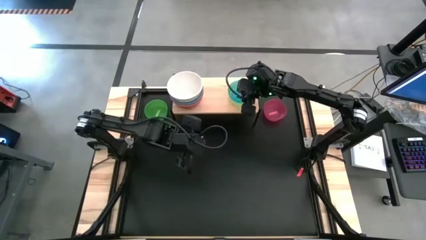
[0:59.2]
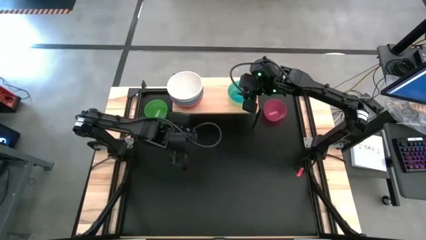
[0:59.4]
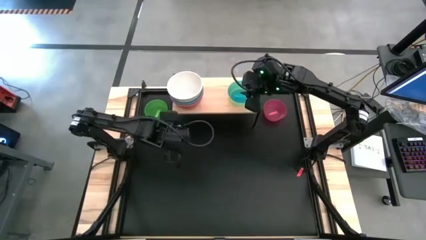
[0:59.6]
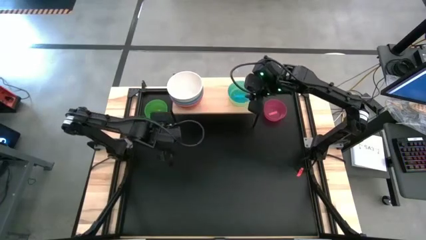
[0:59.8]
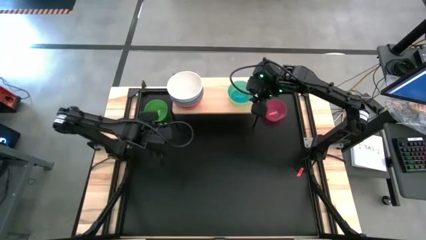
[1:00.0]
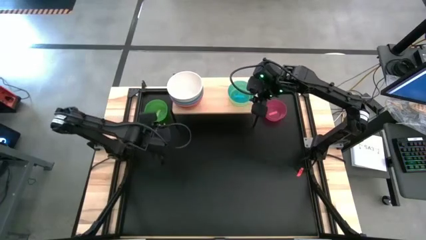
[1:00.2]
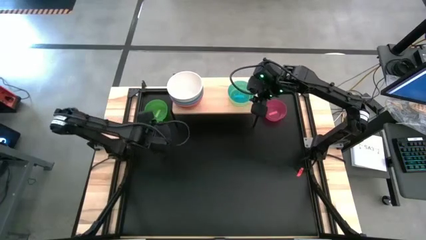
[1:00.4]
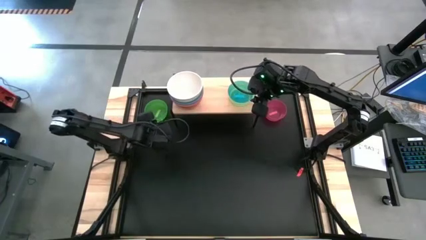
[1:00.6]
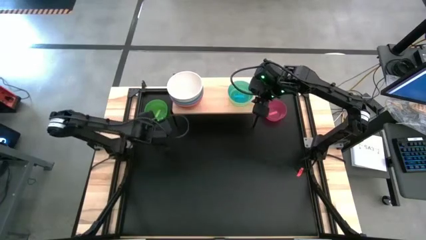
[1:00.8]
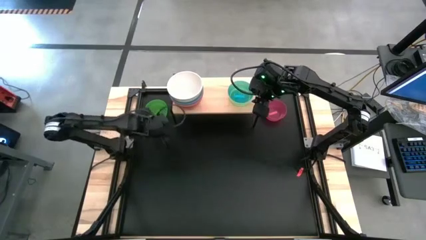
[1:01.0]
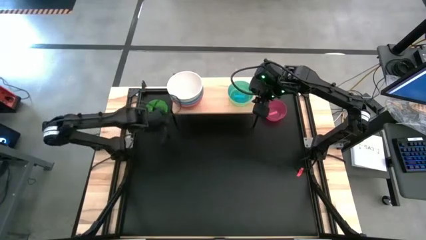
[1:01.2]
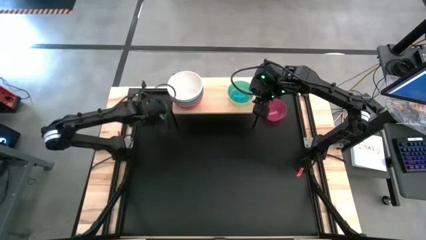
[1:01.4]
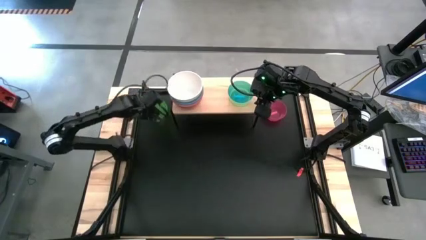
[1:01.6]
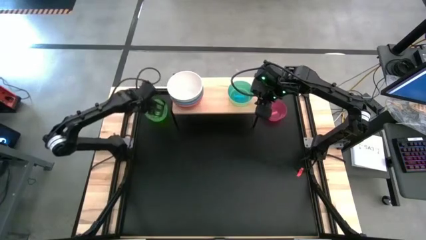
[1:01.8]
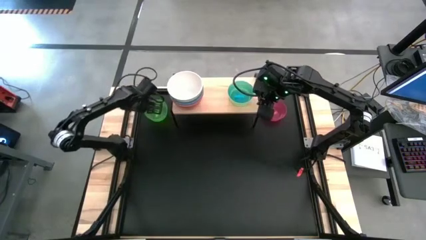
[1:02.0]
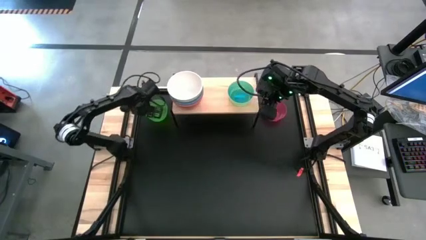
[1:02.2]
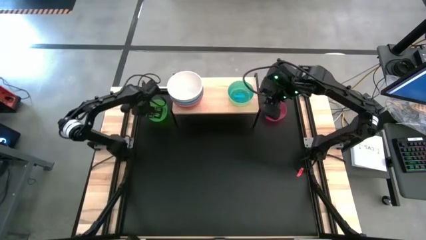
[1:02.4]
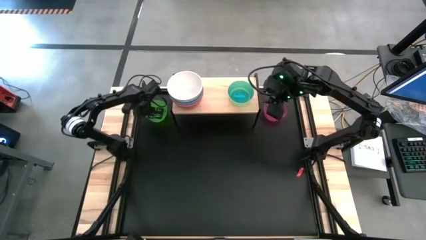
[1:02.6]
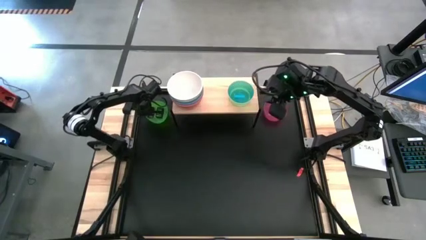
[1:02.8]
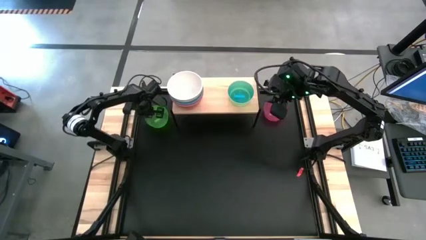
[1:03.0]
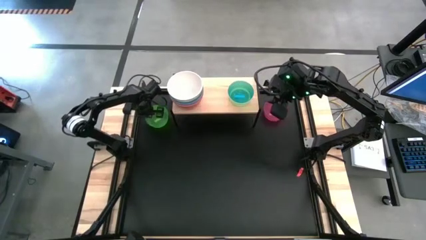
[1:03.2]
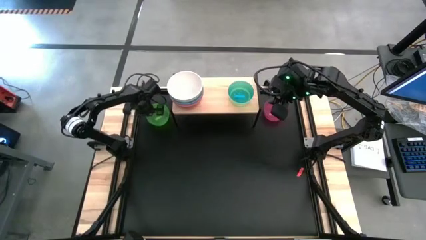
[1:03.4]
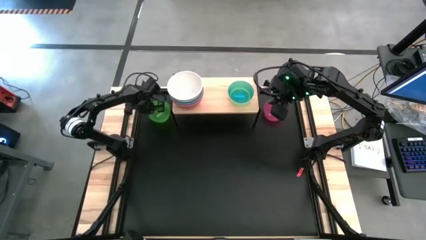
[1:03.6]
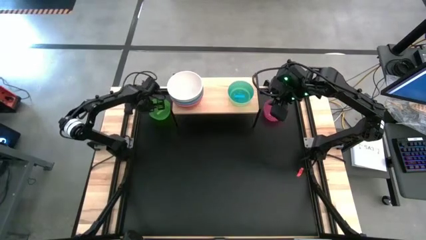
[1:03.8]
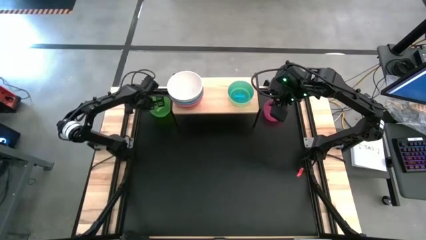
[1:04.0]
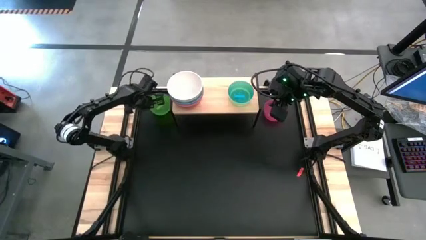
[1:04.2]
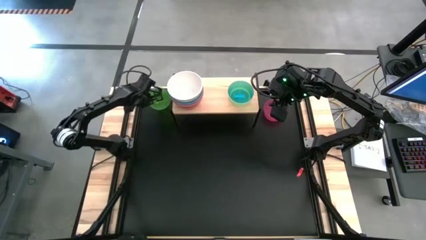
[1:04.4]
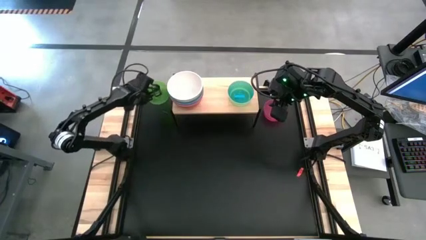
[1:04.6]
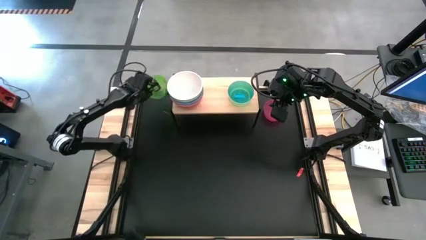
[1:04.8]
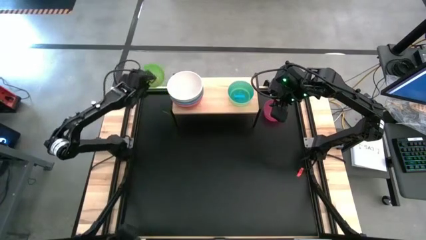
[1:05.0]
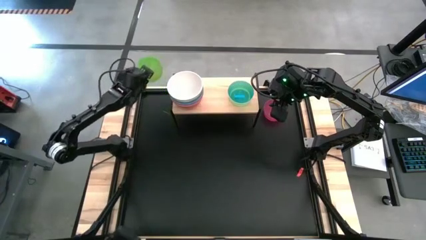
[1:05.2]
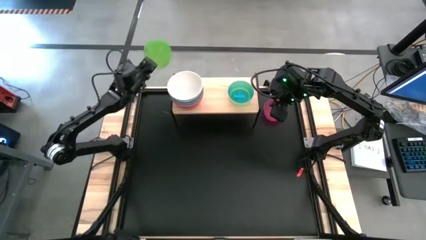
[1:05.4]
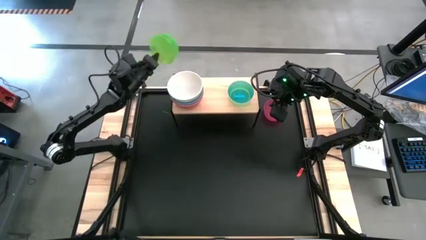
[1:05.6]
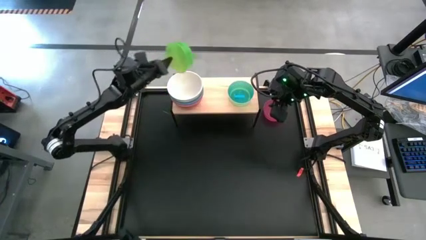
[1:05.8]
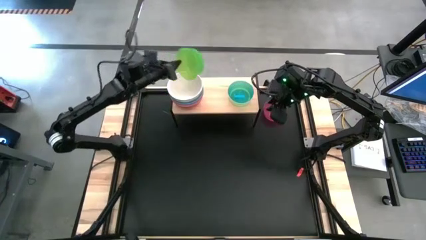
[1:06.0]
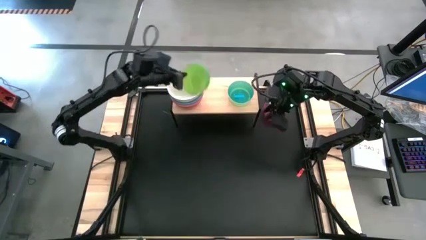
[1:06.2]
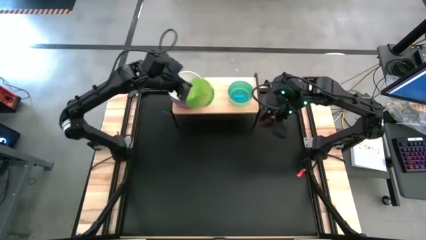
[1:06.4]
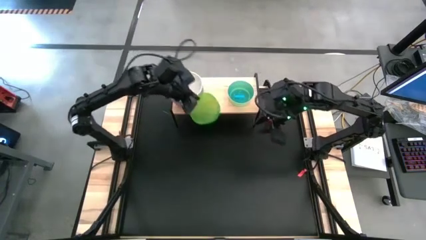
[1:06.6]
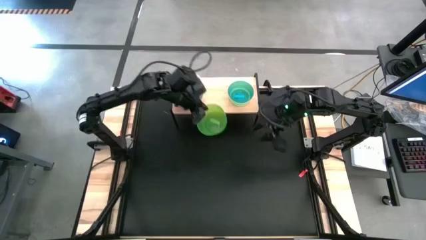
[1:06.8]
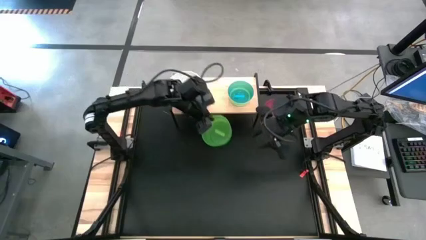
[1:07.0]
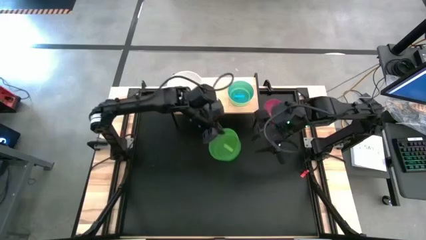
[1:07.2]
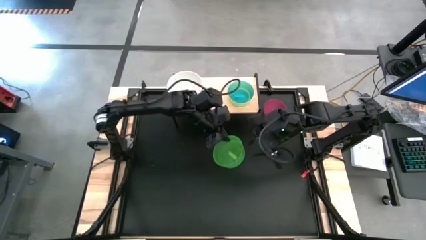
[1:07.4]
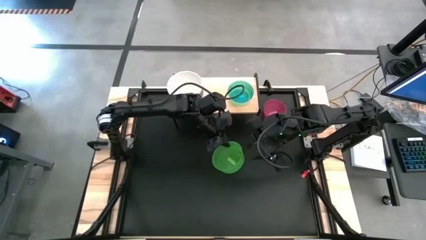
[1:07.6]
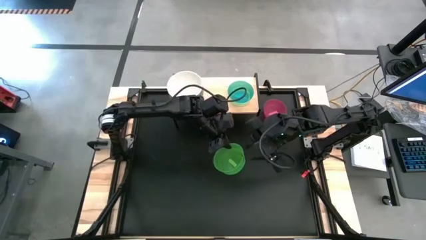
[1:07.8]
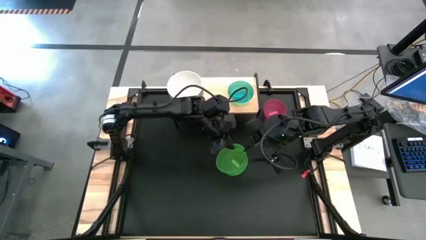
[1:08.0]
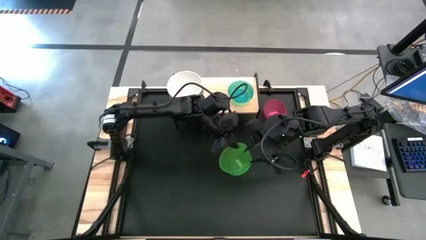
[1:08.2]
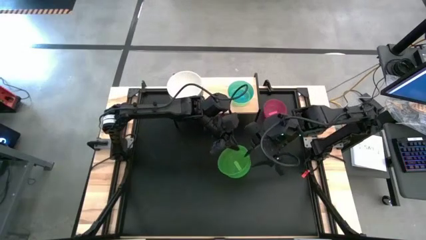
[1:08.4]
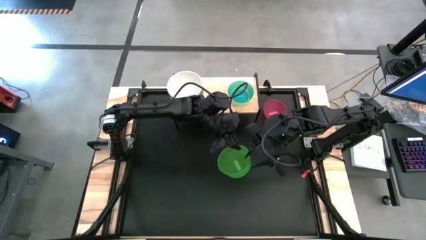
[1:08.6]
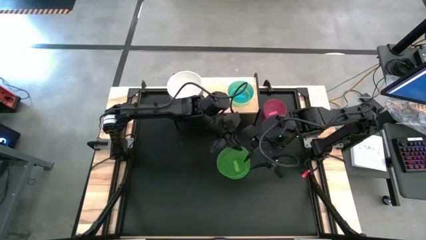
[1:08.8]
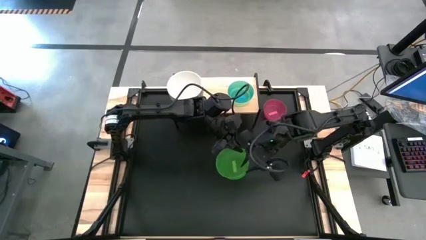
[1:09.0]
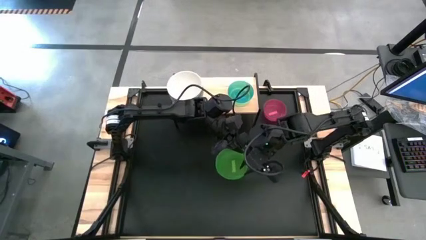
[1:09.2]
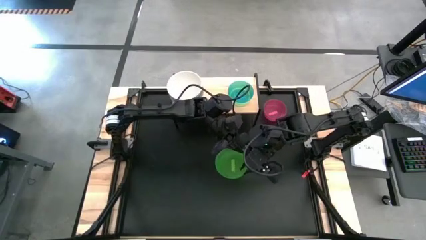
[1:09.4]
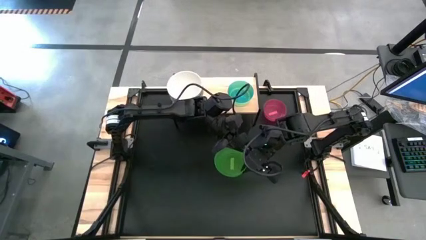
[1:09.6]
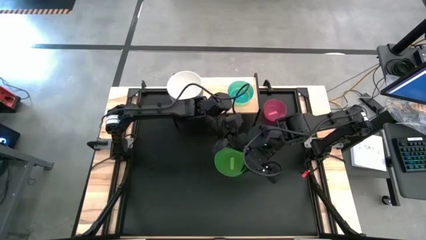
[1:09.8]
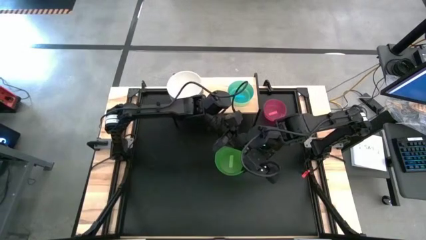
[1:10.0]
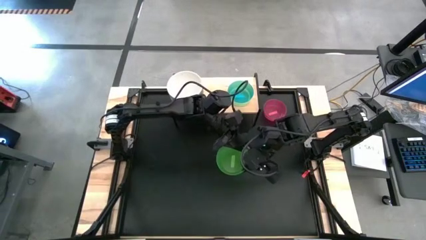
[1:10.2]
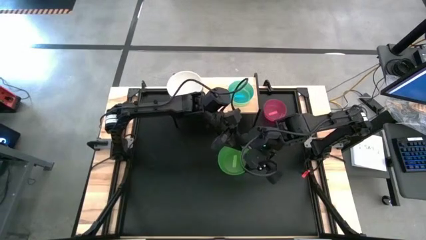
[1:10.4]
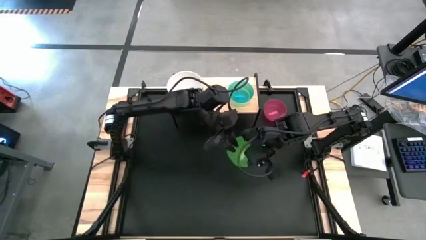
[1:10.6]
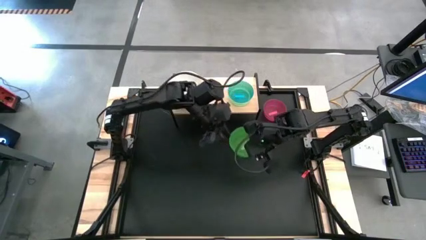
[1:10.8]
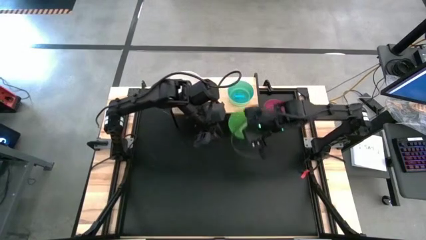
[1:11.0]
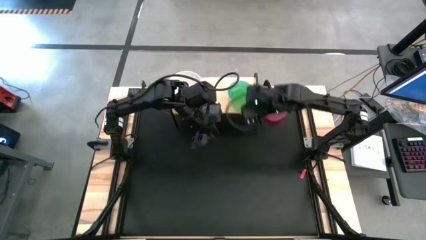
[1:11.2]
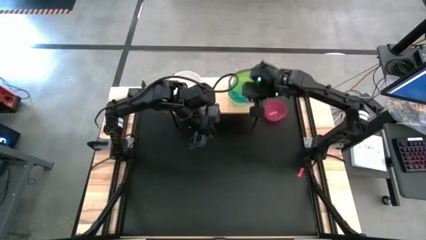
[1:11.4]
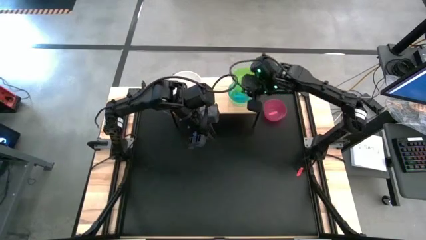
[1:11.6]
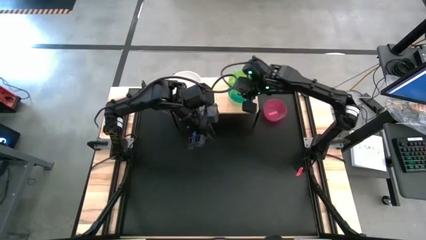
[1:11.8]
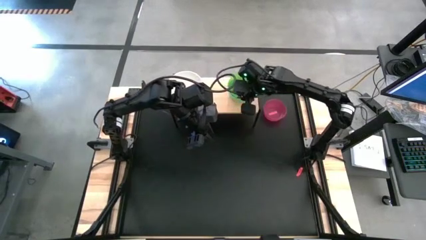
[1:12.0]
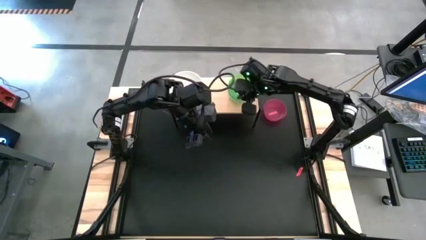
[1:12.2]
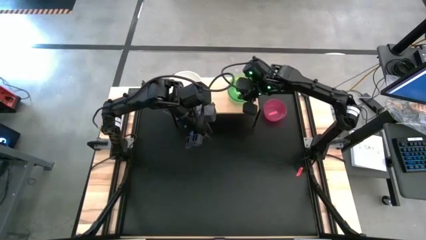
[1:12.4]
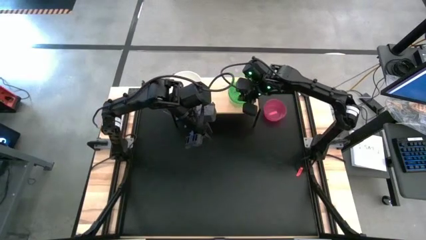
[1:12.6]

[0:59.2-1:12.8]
Task: Place and stack bowls onto a shelf
Stack the green bowl on top of the small blue bowl on the shelf

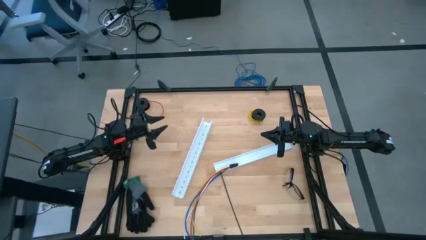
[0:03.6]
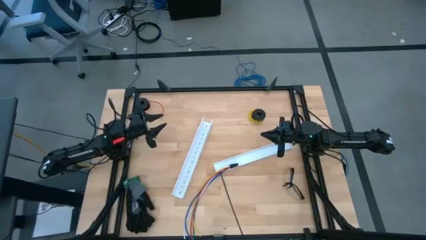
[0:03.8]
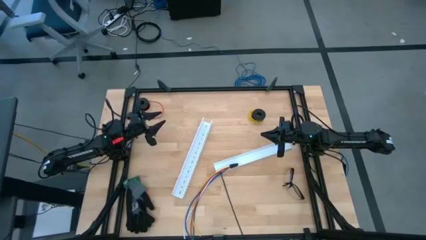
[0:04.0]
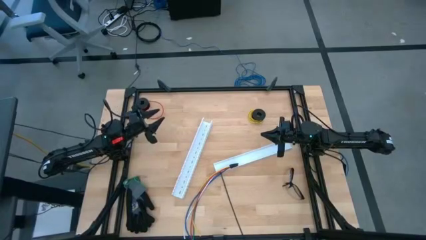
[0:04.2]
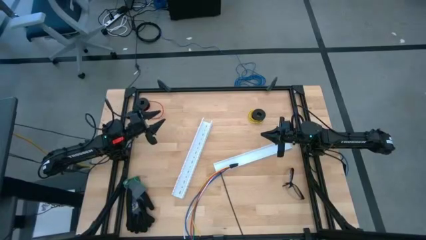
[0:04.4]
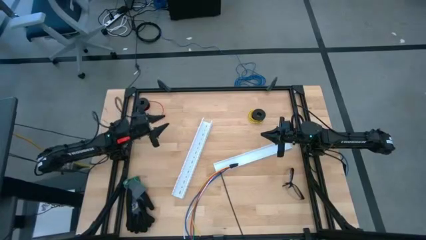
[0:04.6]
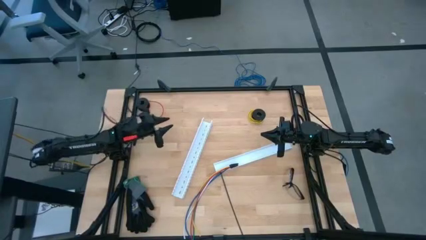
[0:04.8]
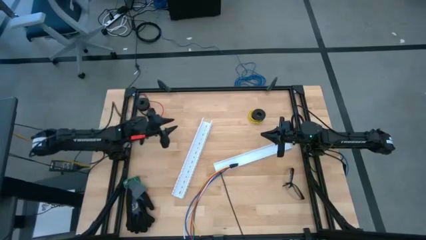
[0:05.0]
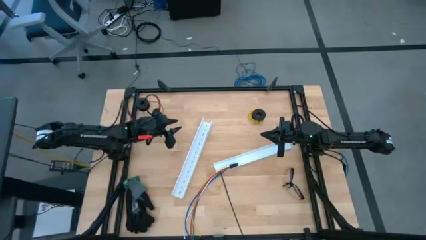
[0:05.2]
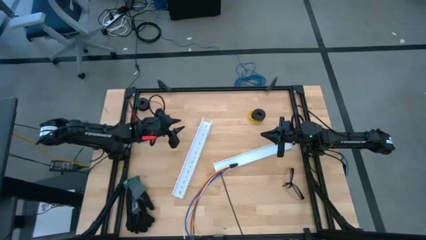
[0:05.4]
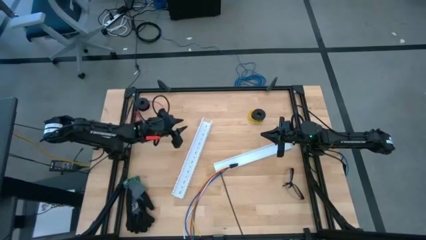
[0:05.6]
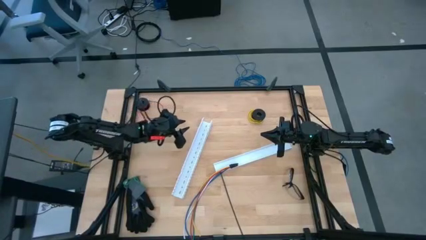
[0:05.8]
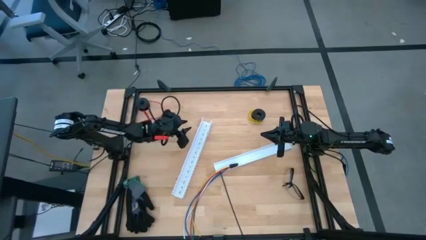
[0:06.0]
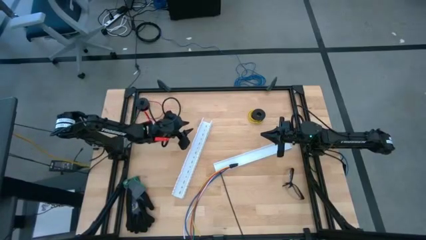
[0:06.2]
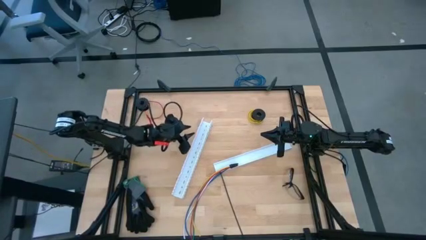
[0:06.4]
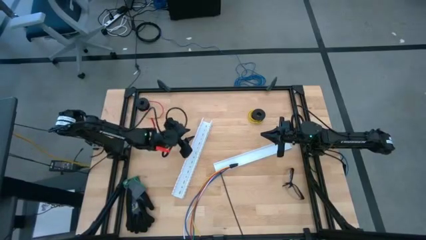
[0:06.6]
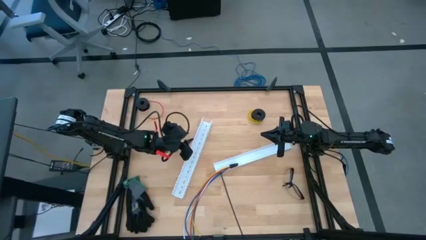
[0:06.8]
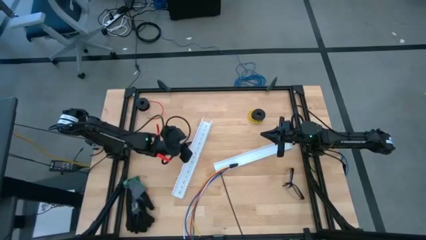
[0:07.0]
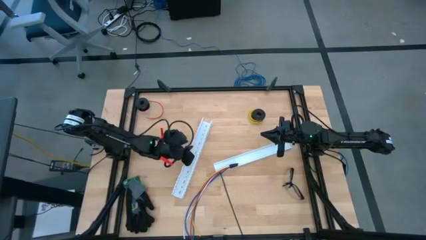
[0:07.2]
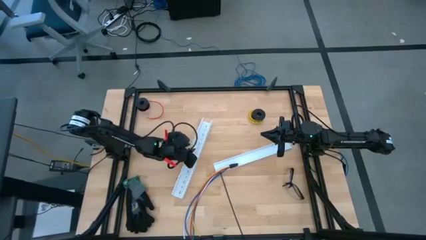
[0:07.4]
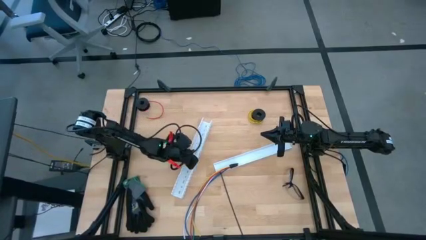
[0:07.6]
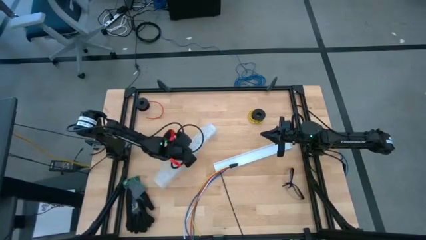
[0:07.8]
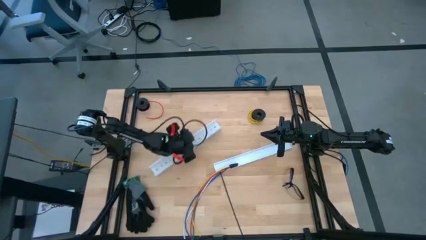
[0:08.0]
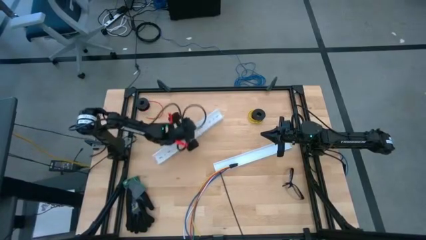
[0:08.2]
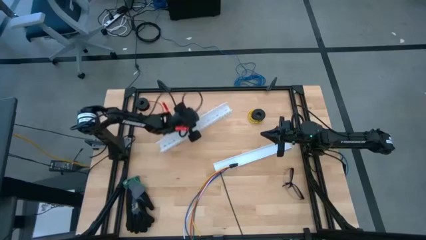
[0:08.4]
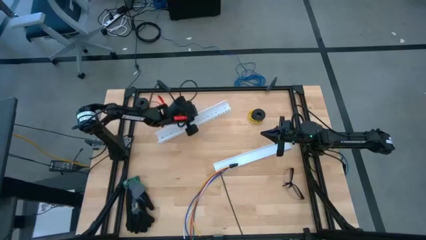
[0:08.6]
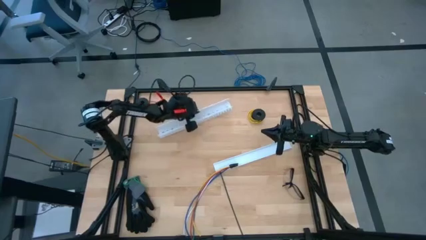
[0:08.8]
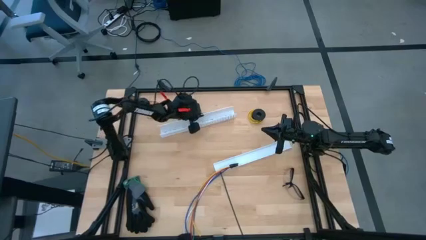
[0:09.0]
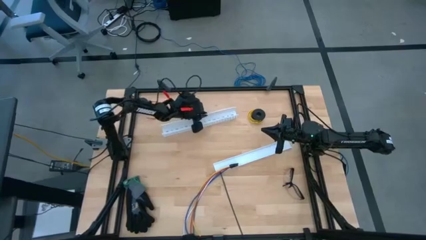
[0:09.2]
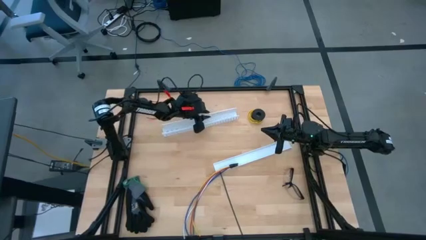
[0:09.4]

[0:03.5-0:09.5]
Task: Ziptie cables
Move the white cable duct to the top of the table
